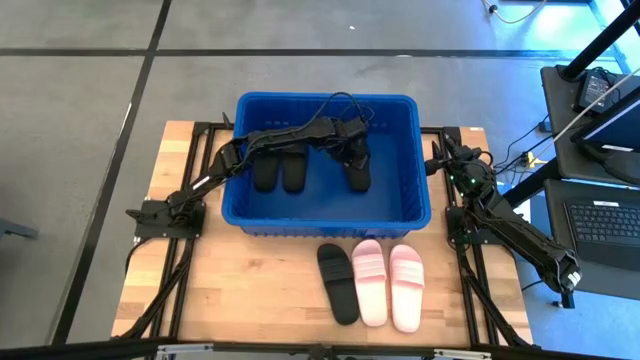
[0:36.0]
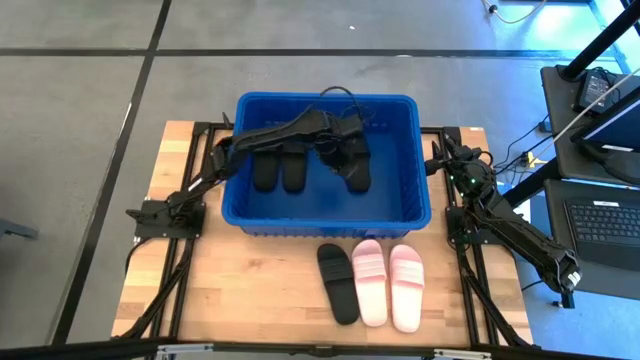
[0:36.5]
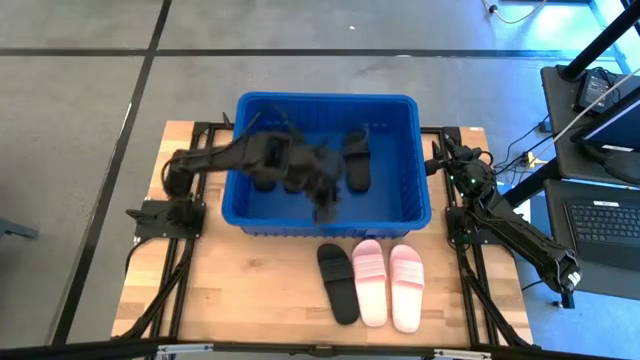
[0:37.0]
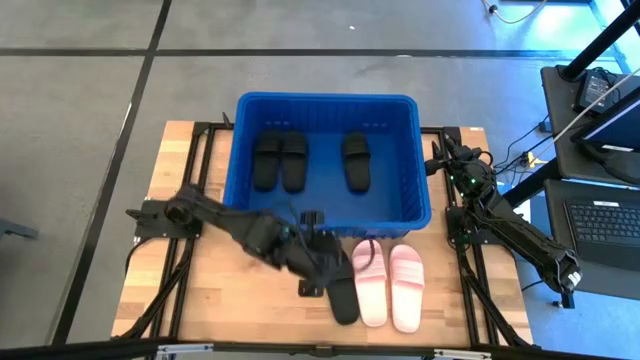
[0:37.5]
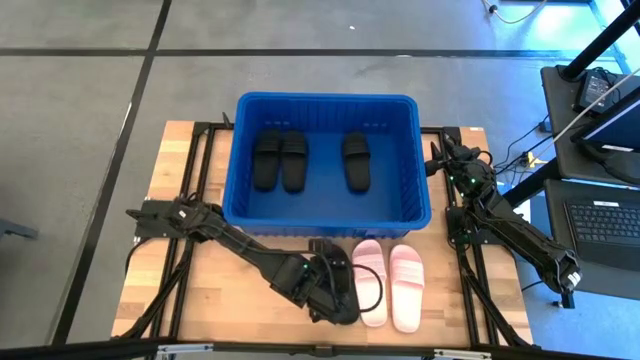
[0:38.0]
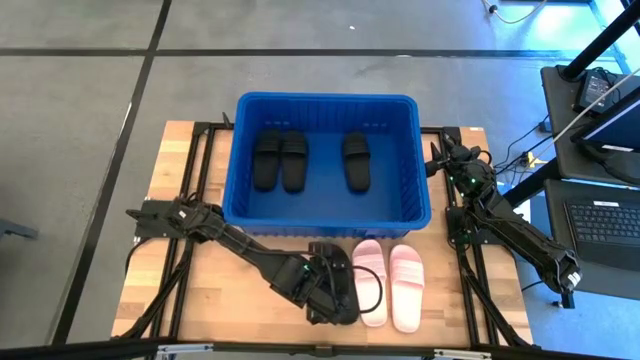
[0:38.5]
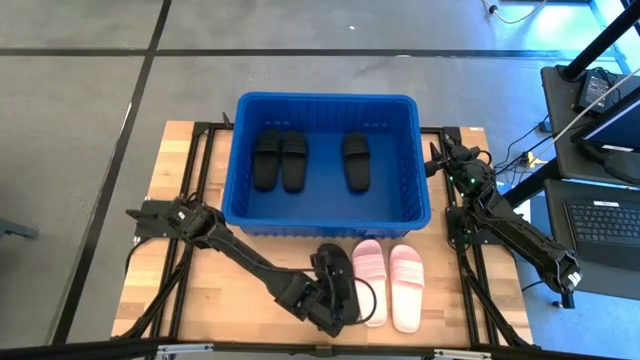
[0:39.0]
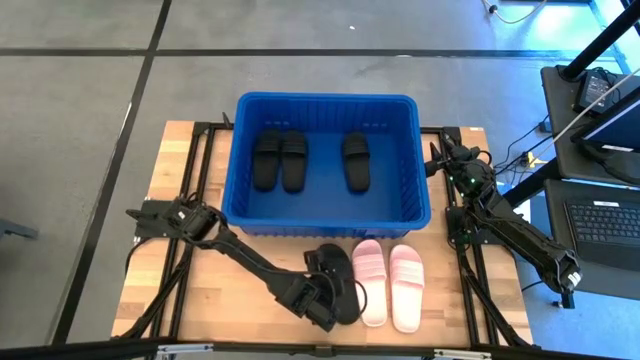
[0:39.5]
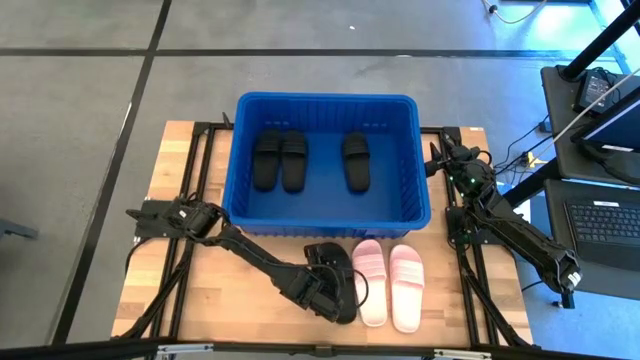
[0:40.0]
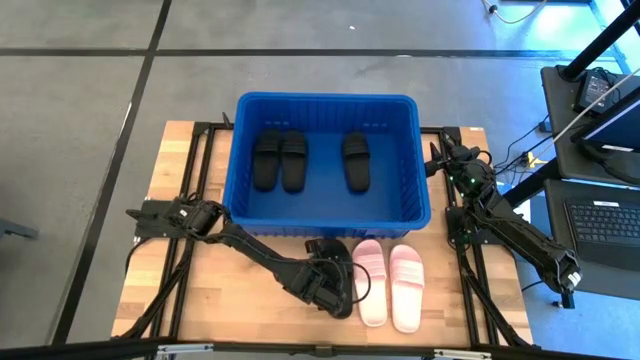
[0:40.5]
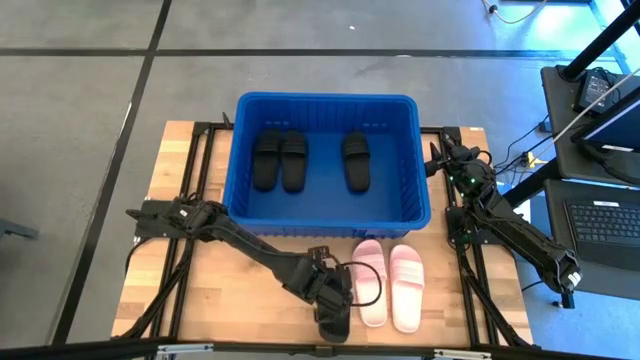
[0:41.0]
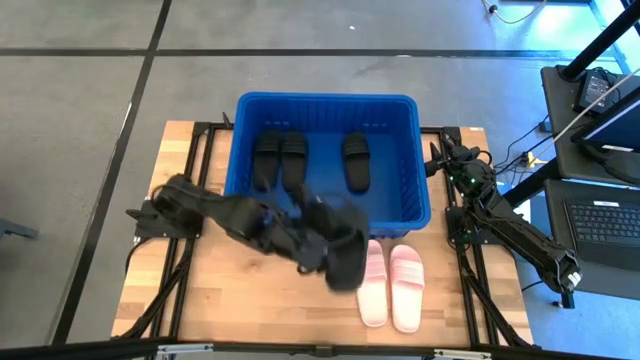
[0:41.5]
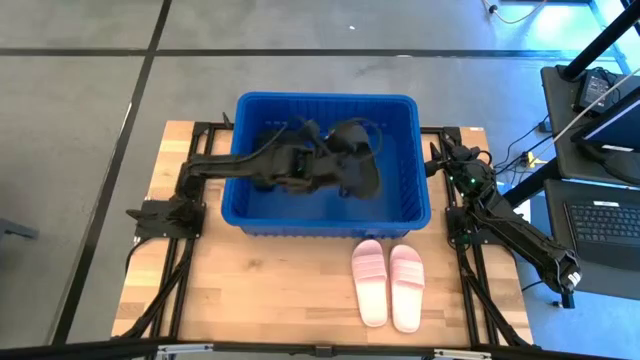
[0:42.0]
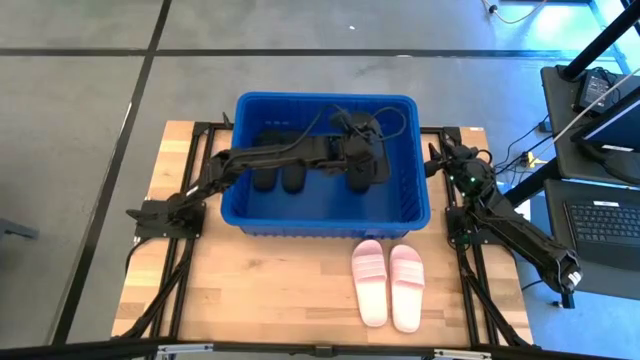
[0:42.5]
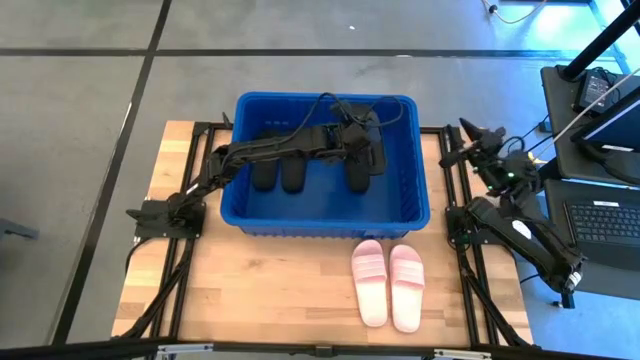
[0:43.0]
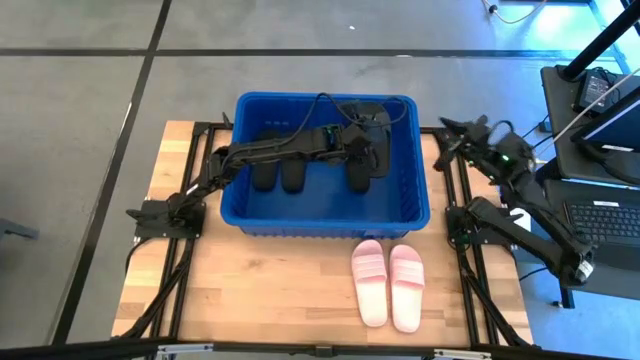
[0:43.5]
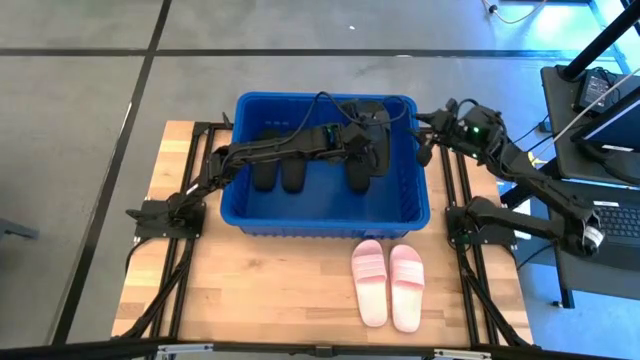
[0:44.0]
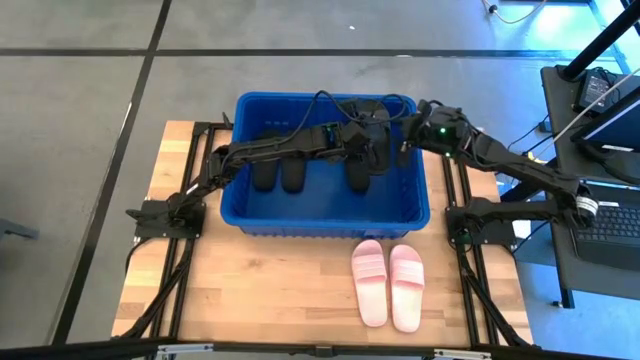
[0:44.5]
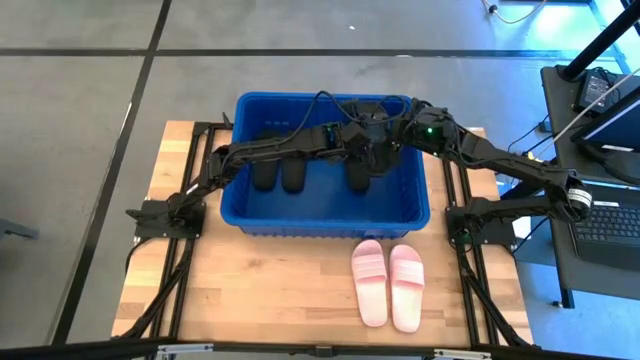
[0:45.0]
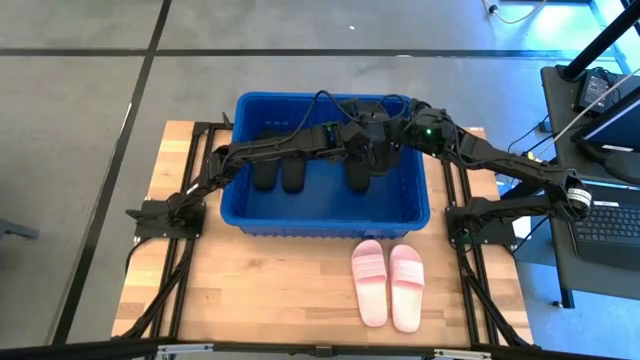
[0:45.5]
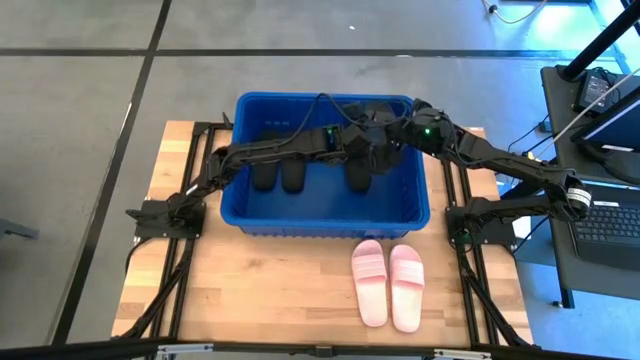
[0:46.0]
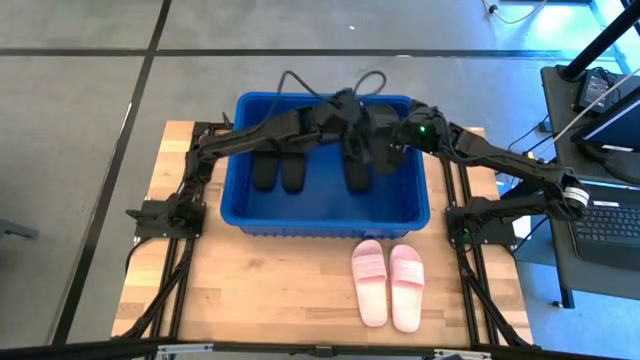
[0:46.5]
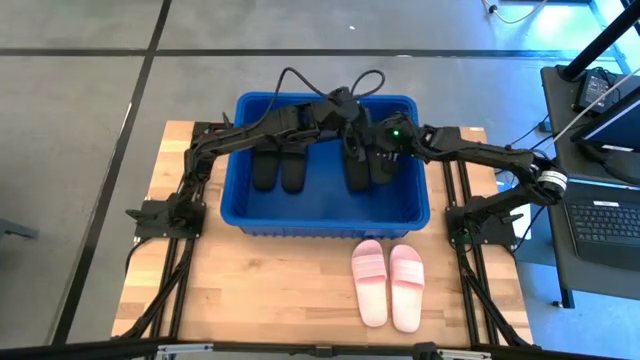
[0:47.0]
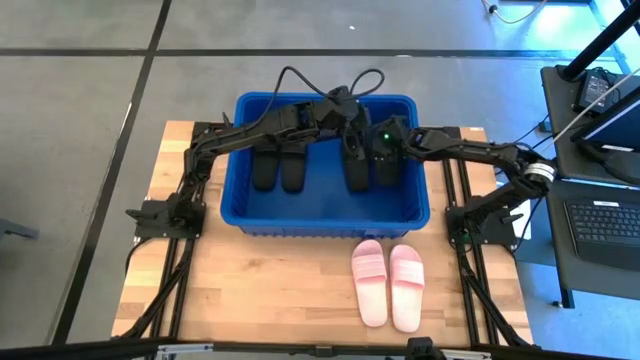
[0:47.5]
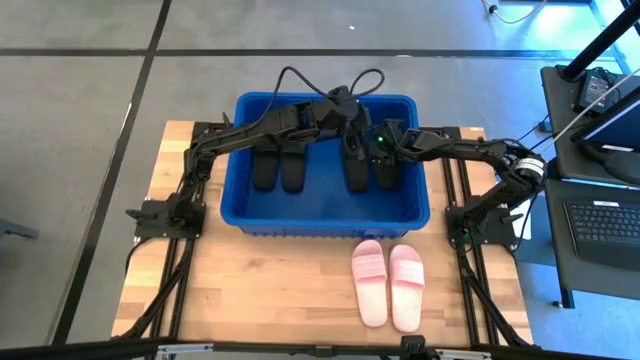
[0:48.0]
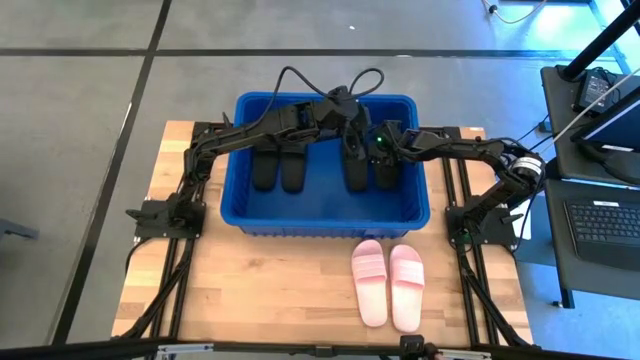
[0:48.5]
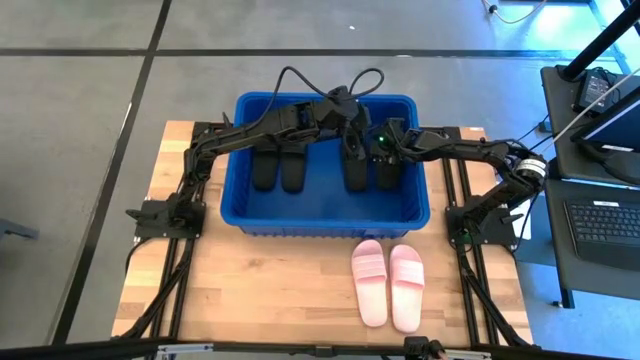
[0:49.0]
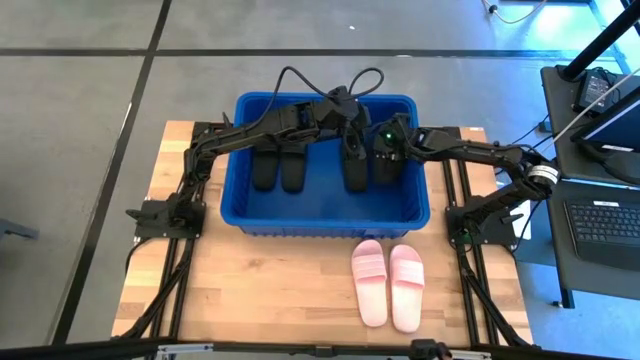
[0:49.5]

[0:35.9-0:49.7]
Task: Pick and place slides into bin
Put the black slide into the blue bin

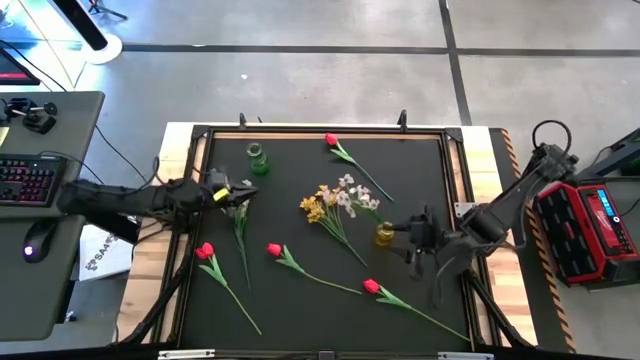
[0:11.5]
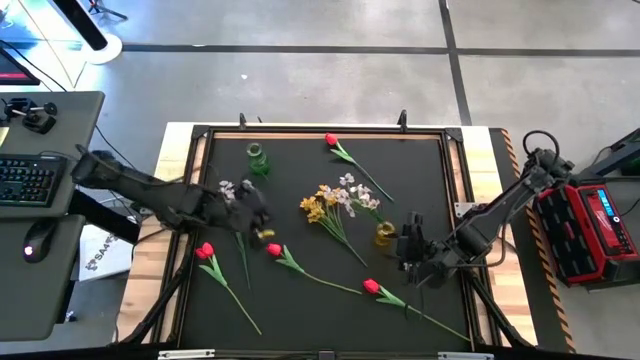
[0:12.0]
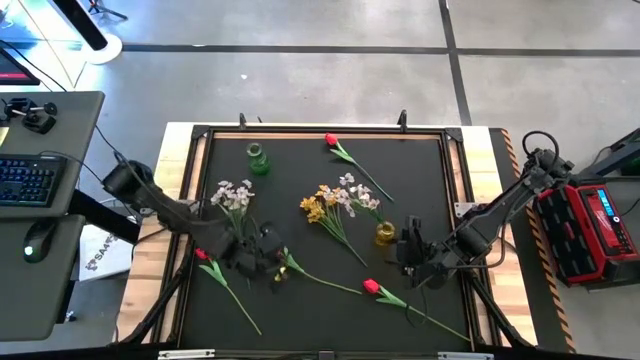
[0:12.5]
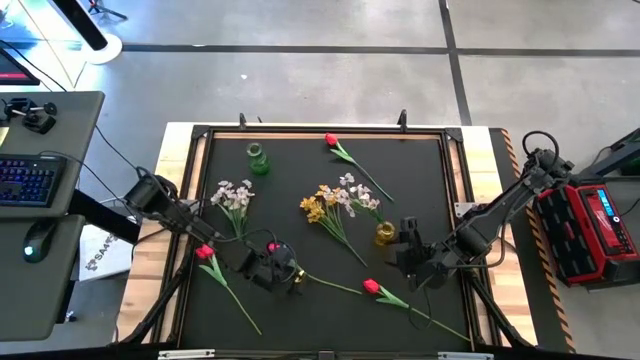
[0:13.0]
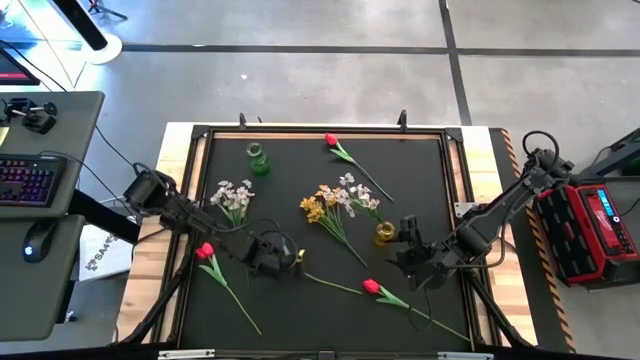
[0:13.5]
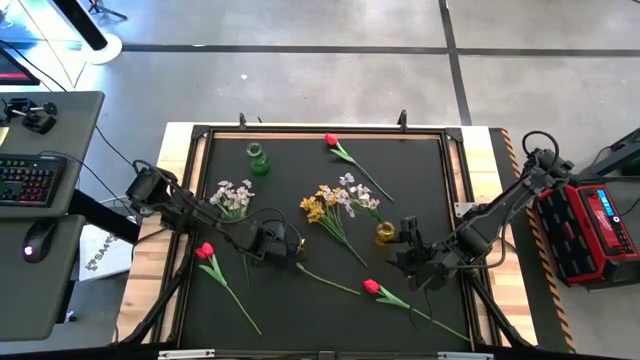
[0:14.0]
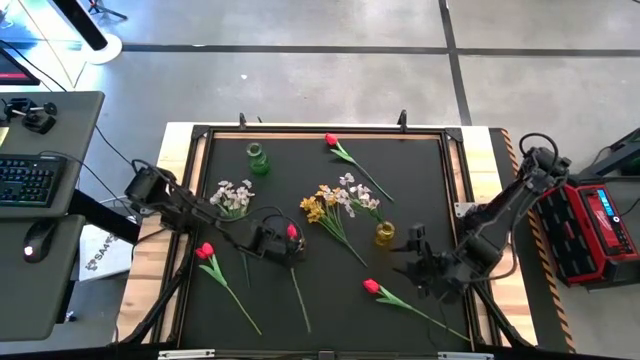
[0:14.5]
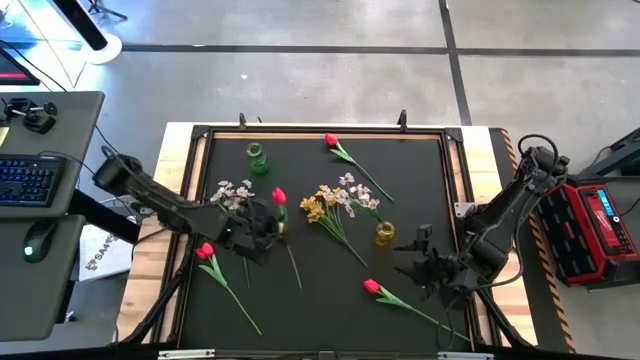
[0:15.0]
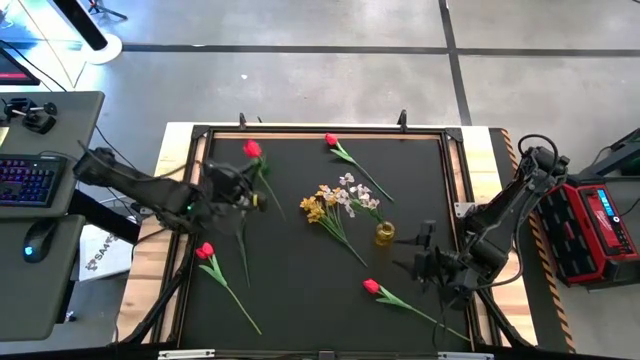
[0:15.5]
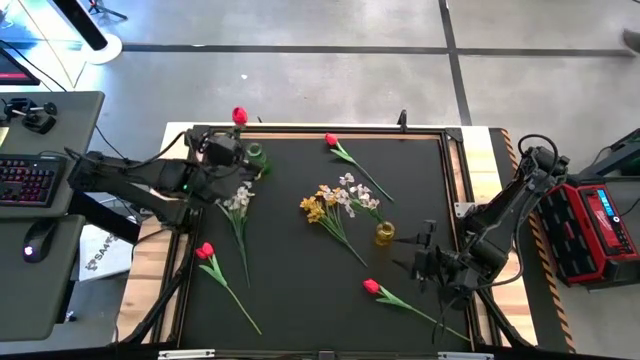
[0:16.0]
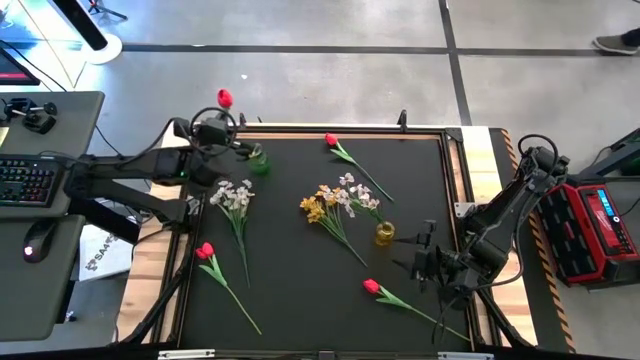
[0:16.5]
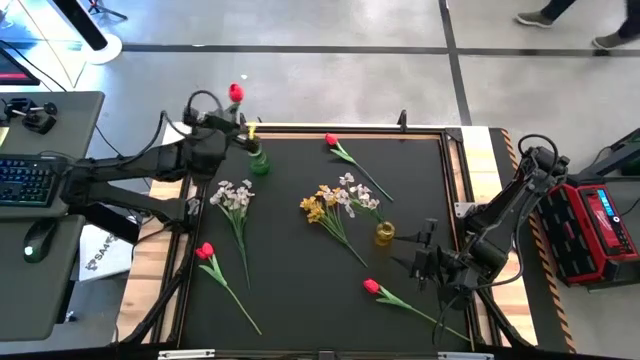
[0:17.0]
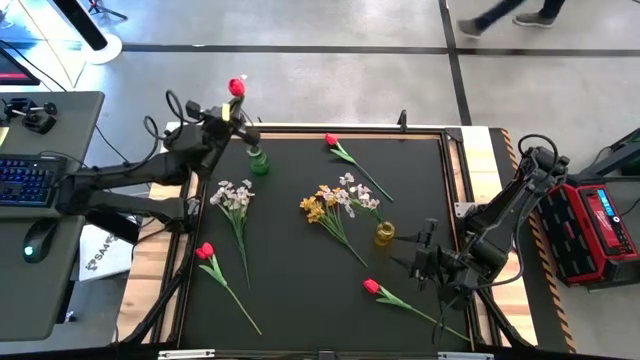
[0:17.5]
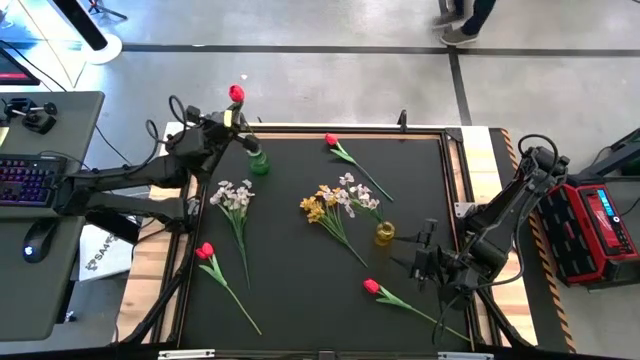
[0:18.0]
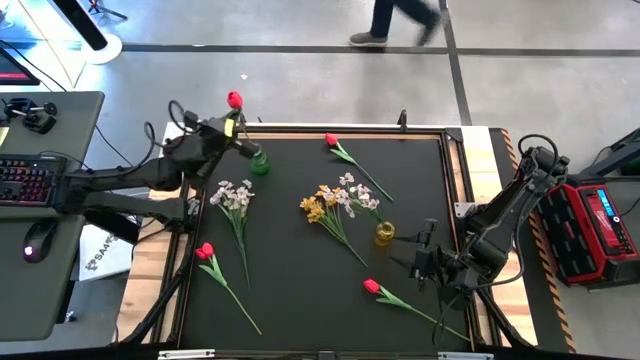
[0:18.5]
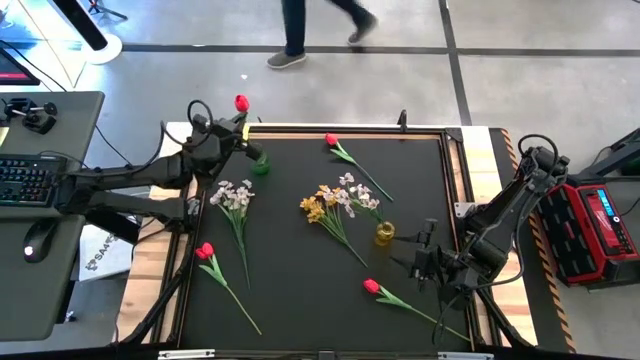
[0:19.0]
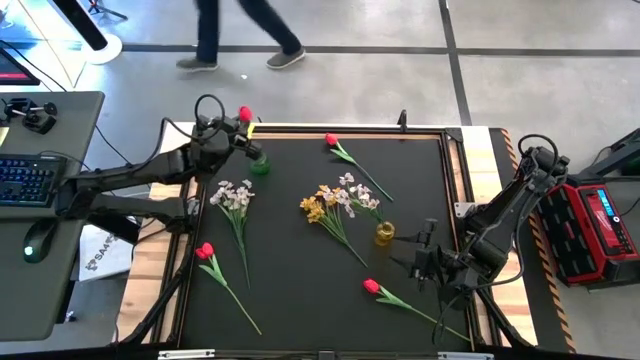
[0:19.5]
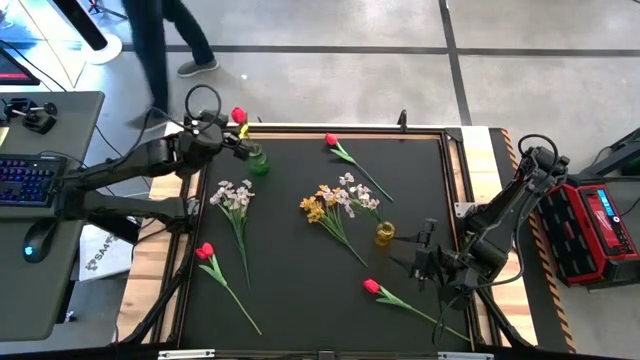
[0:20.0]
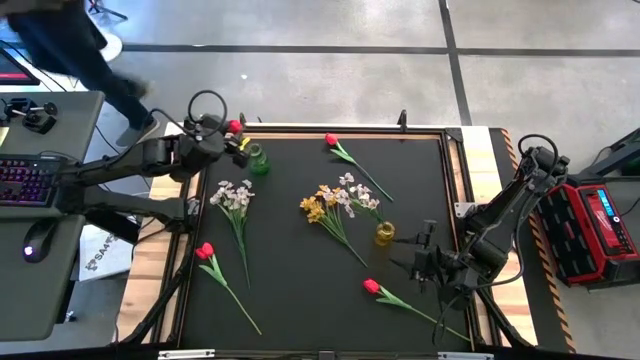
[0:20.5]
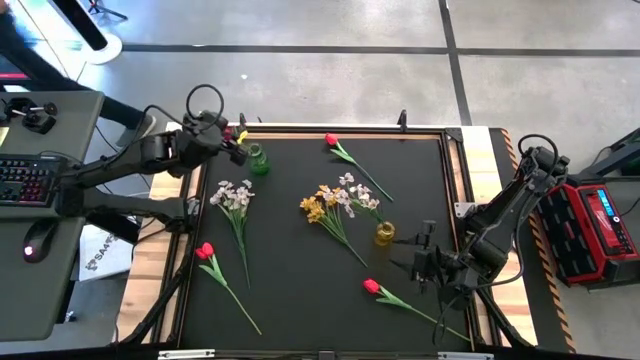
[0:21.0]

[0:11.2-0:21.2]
Task: Sort flowers into vase by color
Put the center red tulip in the green vase
